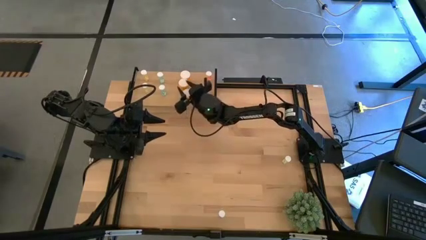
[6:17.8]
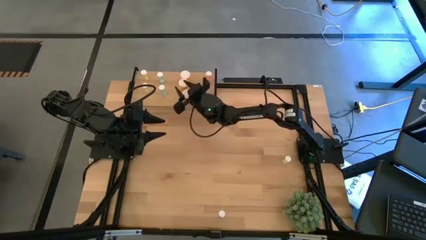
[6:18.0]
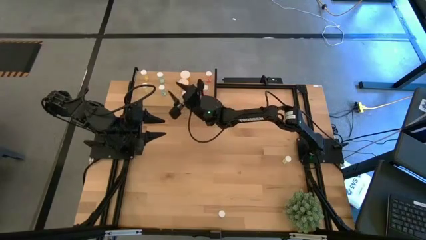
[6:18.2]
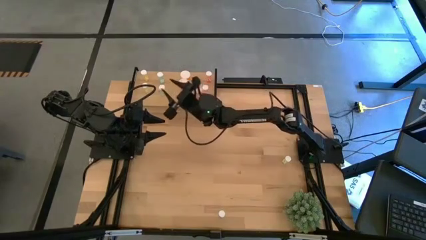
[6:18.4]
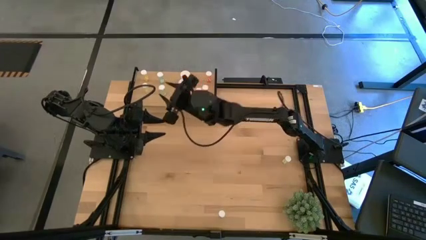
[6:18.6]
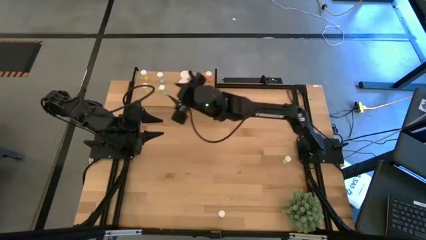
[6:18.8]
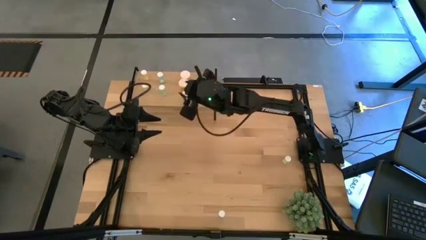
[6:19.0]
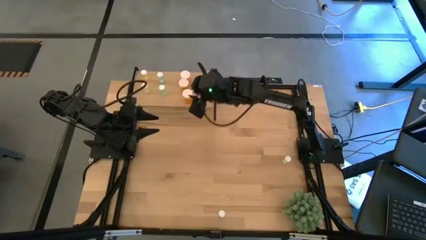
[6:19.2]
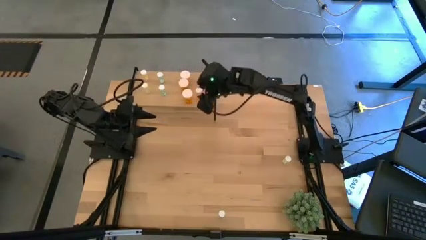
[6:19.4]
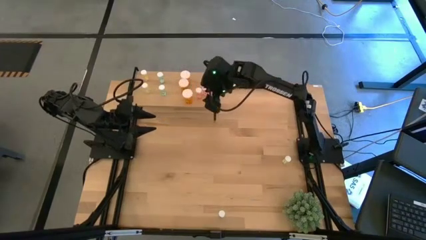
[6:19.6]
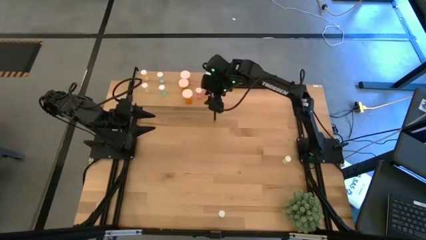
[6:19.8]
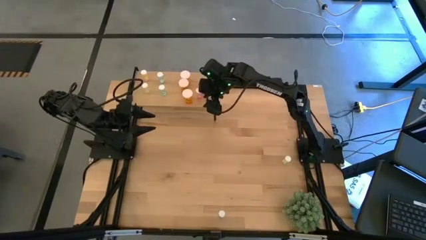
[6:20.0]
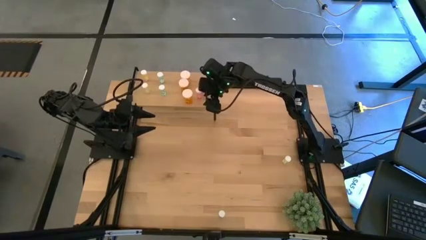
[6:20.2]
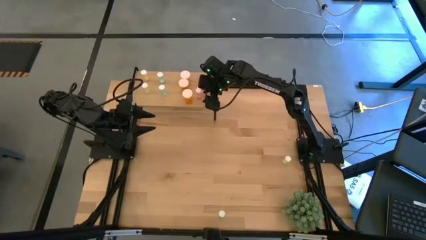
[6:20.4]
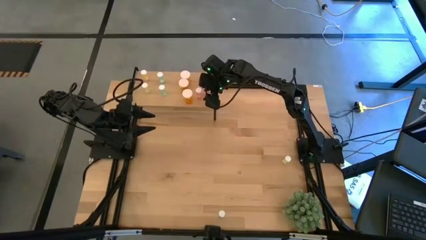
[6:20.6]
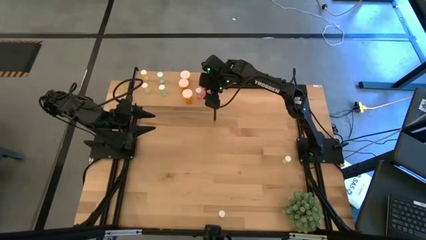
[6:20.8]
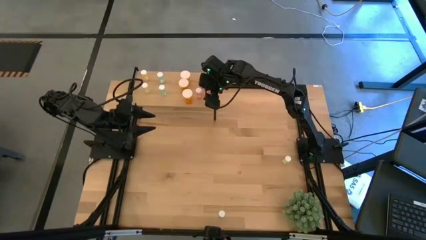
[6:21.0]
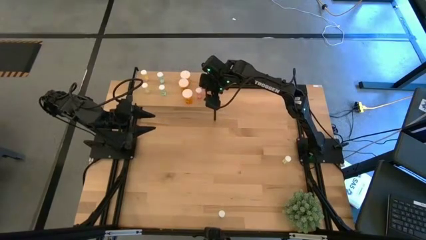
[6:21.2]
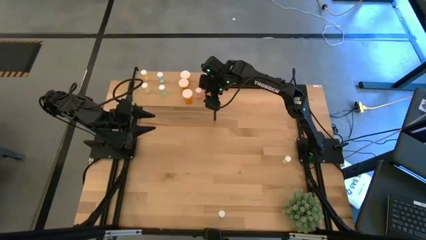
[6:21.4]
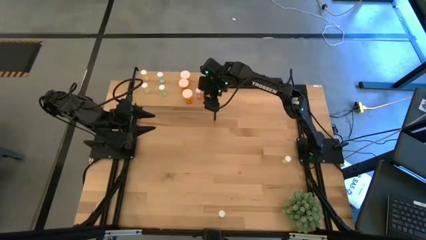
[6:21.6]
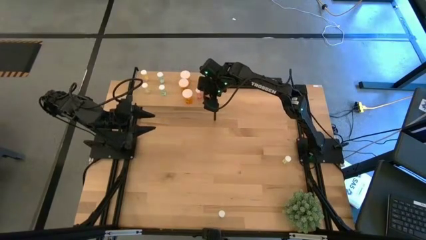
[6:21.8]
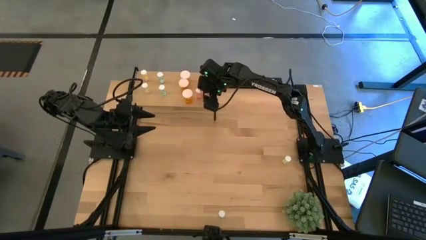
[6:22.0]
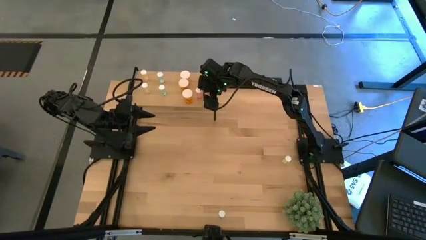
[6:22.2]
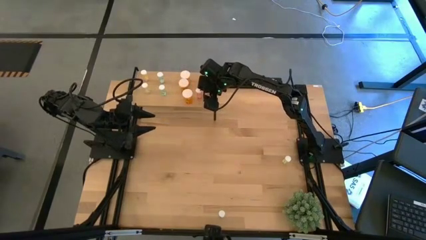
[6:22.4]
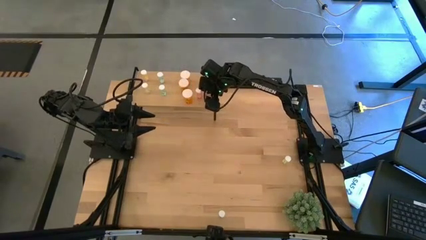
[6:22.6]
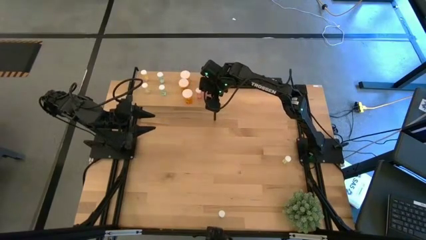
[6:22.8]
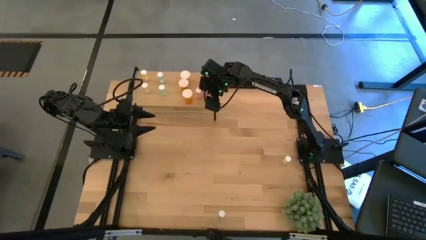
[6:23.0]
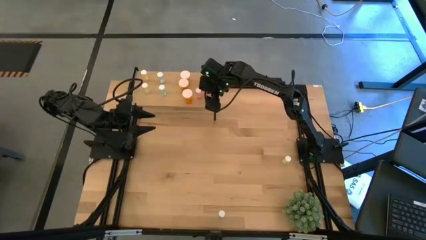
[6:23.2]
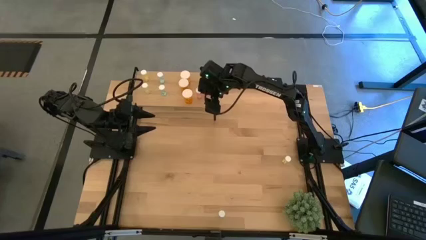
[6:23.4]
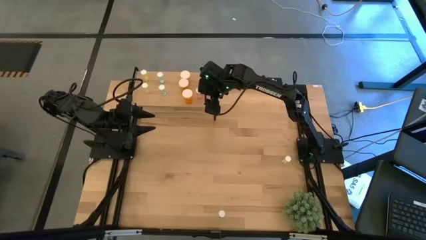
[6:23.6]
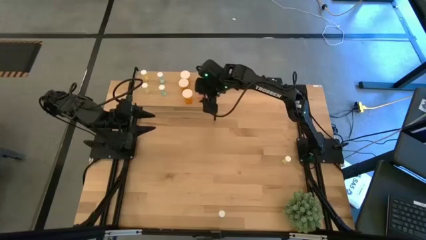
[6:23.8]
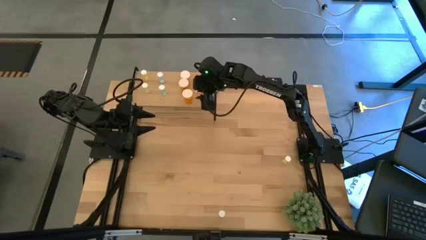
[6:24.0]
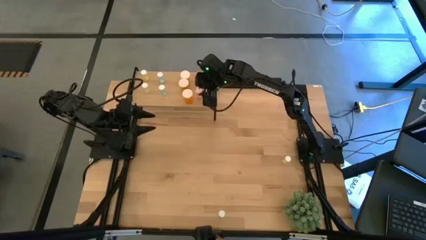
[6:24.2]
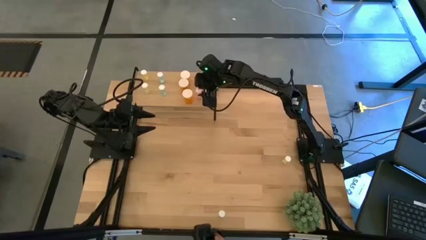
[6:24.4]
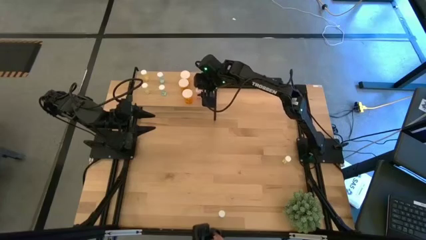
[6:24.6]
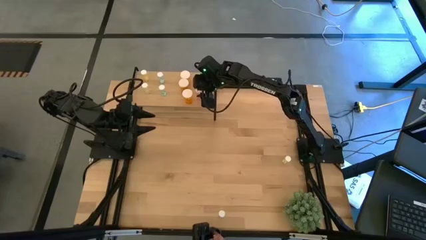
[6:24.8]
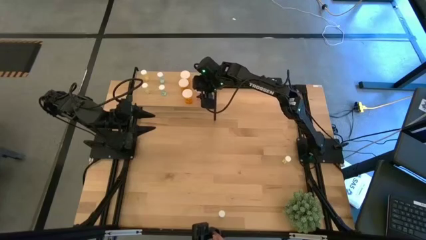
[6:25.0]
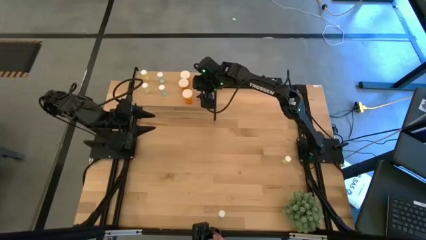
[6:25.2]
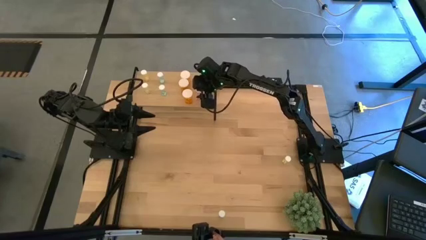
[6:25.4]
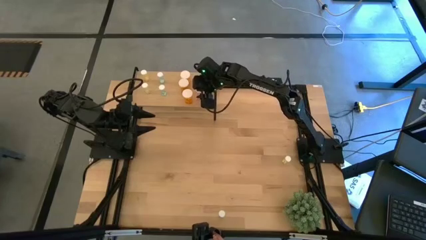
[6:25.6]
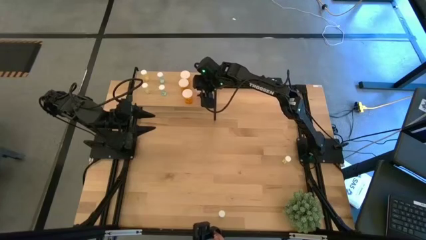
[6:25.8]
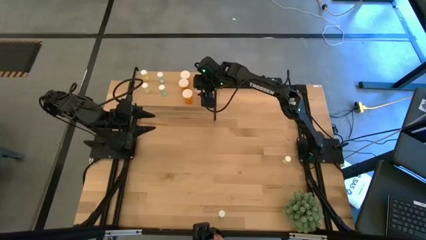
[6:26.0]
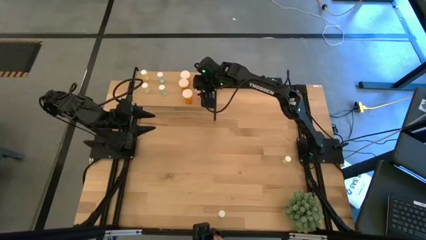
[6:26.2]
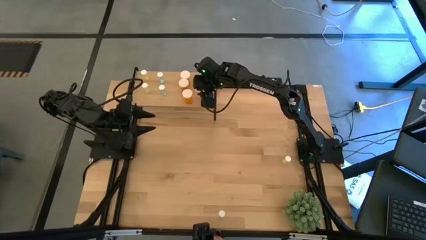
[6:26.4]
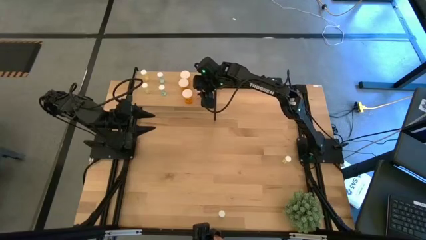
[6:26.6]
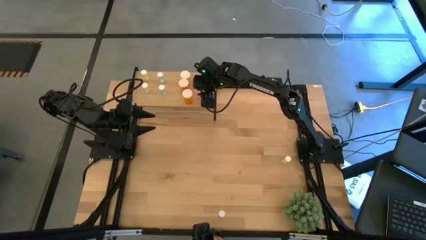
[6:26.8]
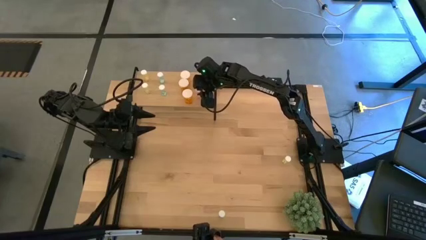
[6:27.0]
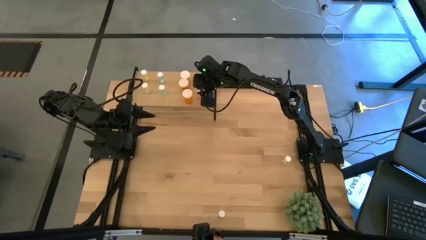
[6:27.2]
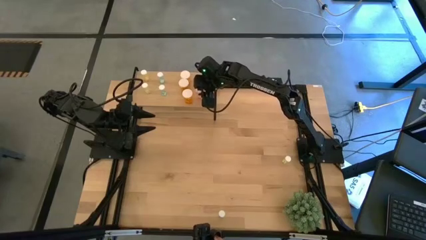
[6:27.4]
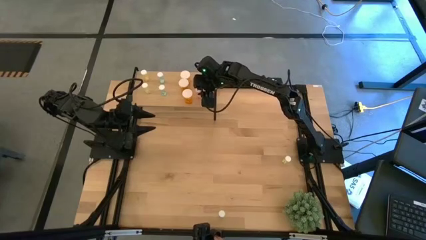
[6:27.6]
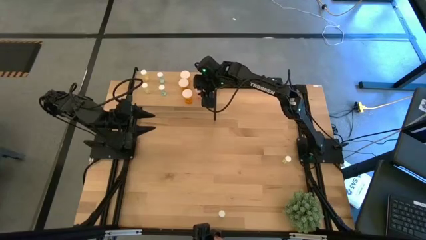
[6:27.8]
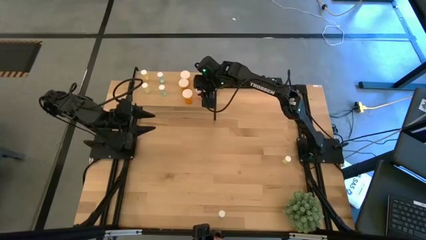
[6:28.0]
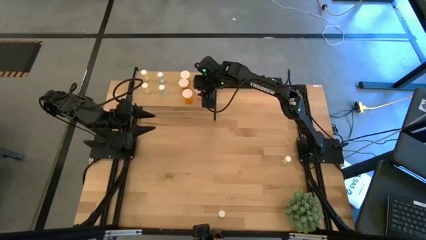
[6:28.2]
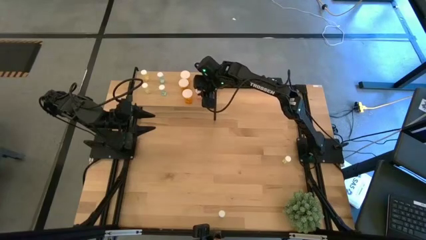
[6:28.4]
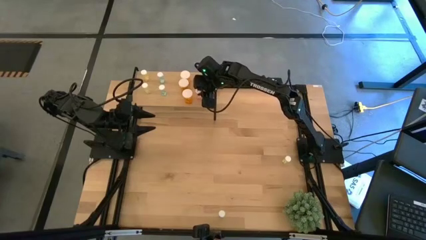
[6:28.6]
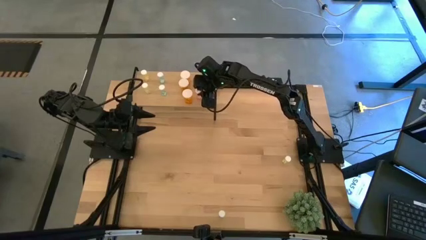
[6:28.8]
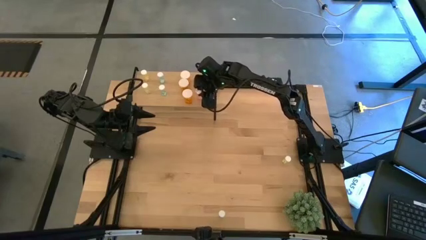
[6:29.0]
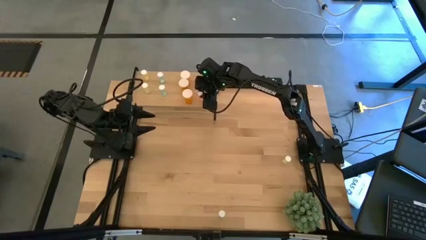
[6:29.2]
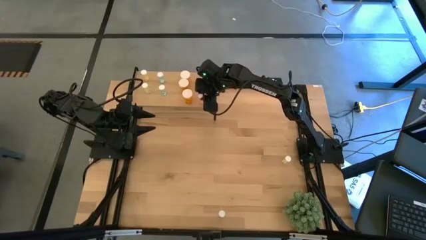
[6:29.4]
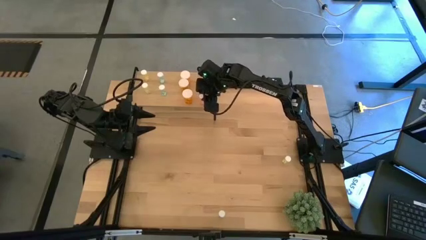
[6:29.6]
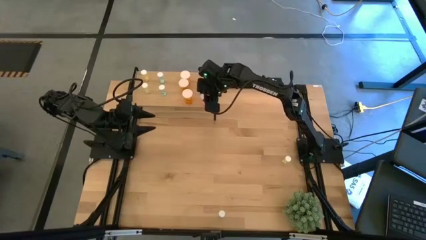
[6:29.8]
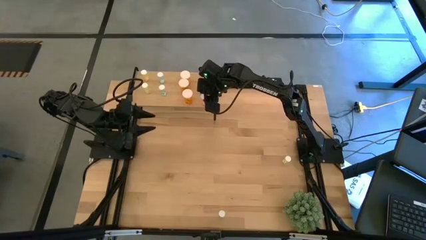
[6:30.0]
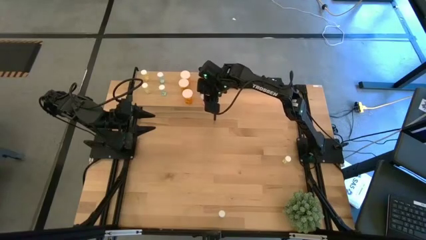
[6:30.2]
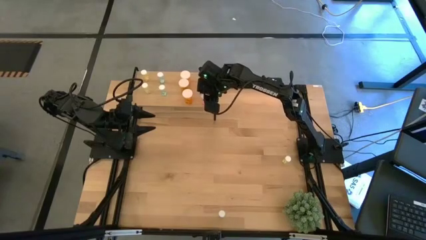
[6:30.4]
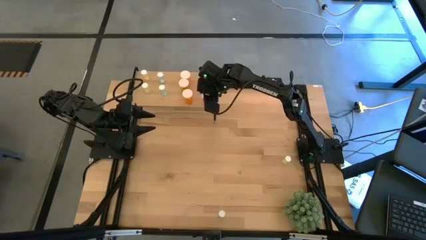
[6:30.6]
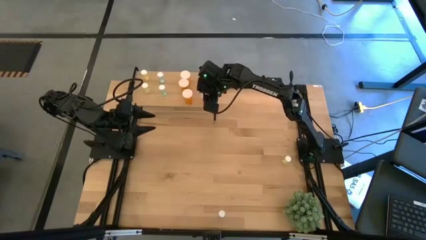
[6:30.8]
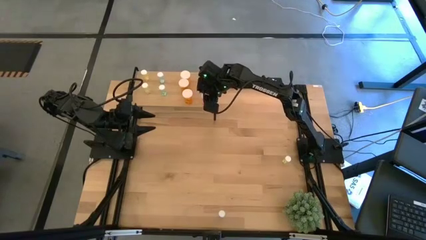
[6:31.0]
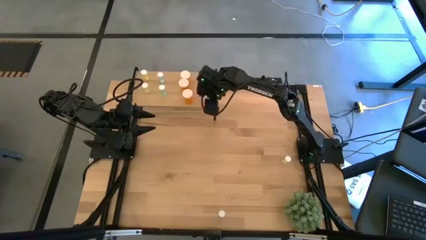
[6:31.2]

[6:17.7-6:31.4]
Task: Pick and place medicine bottles onto shelf by color
Adjust the small red pill bottle
